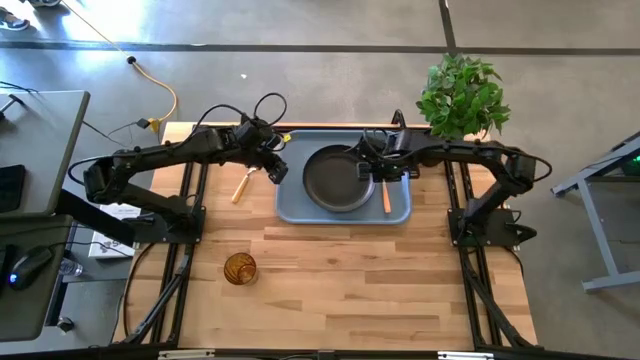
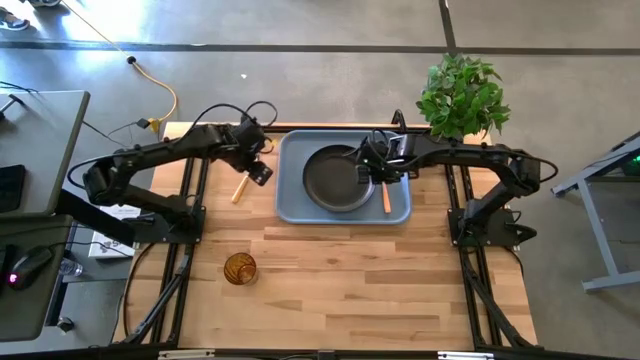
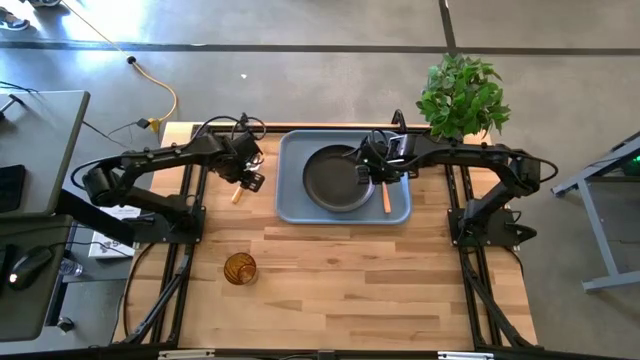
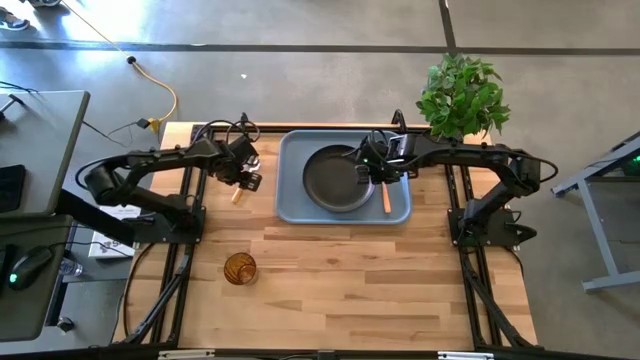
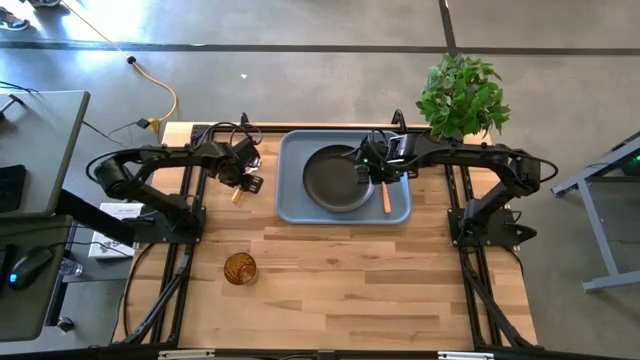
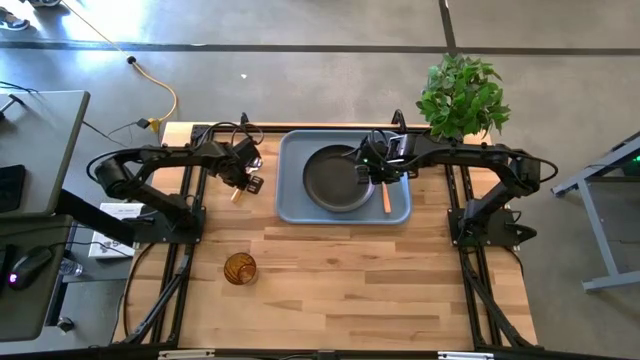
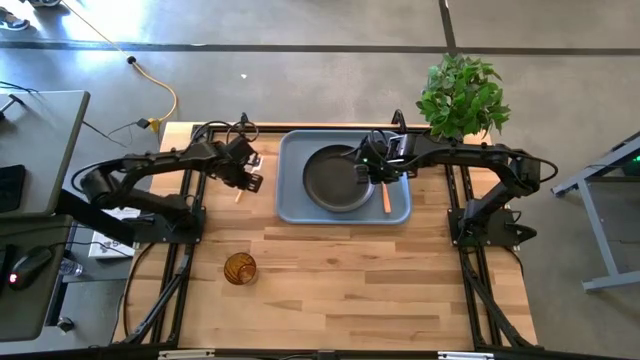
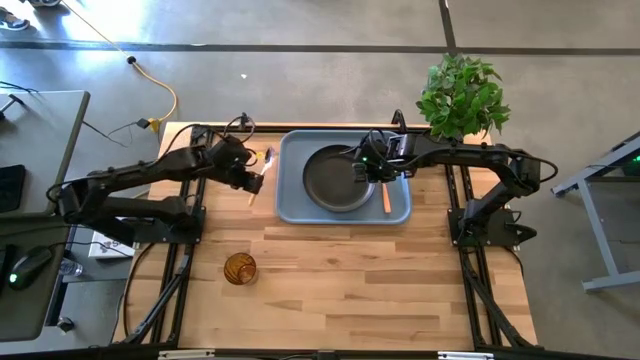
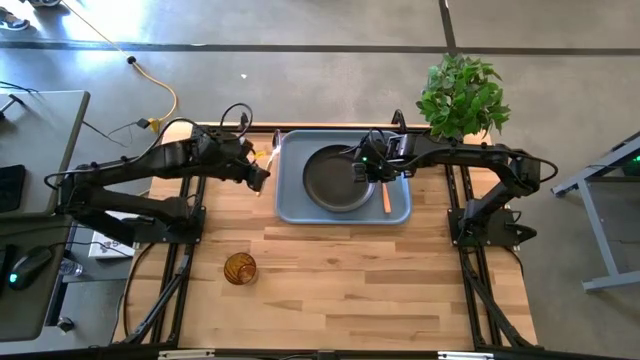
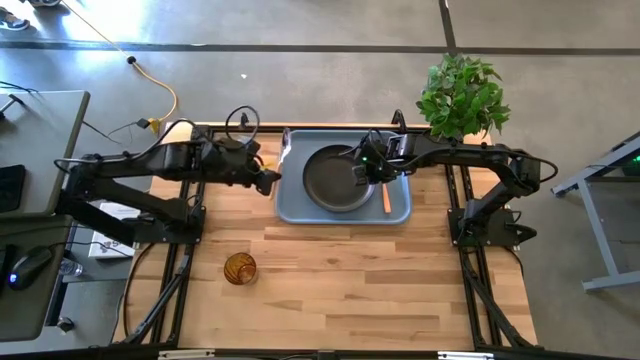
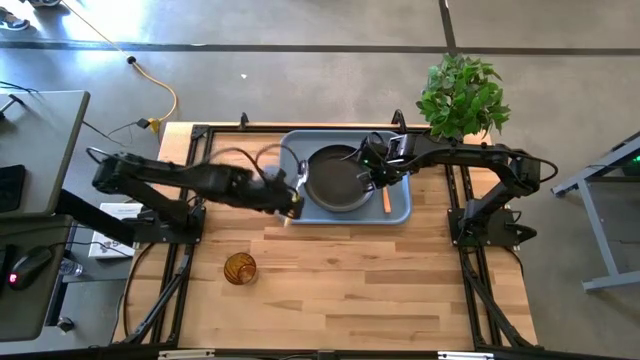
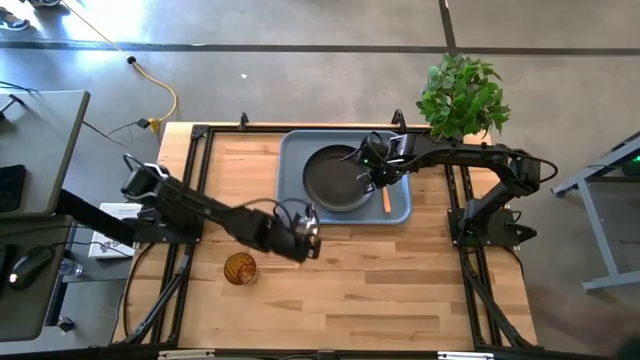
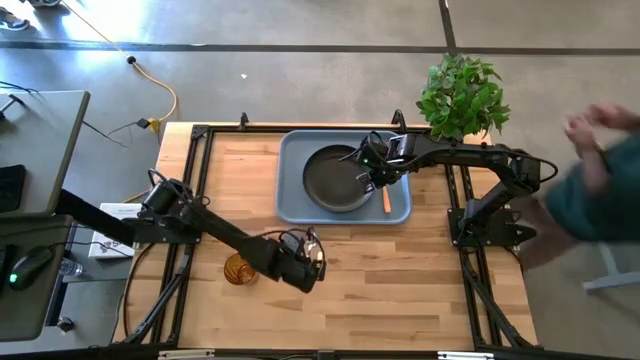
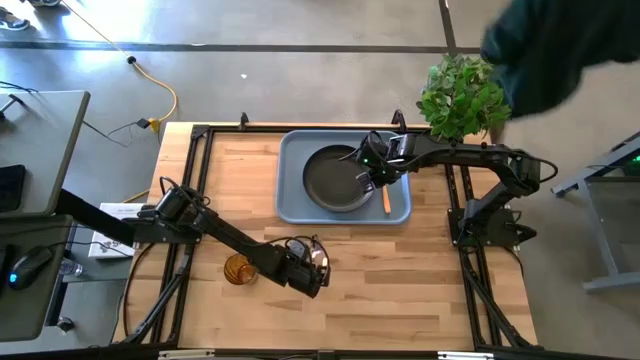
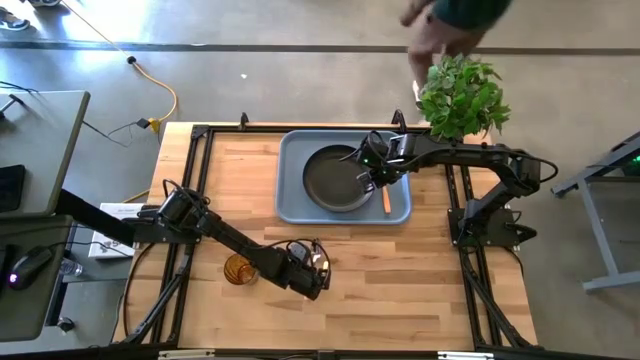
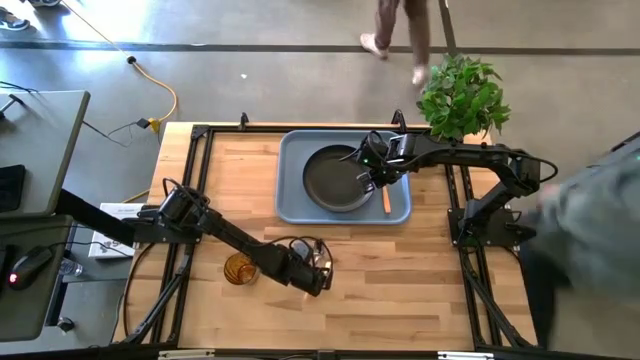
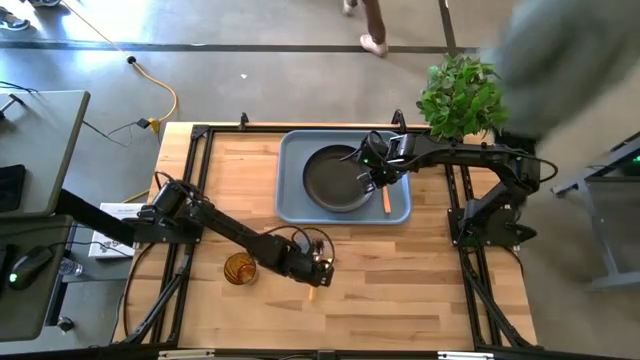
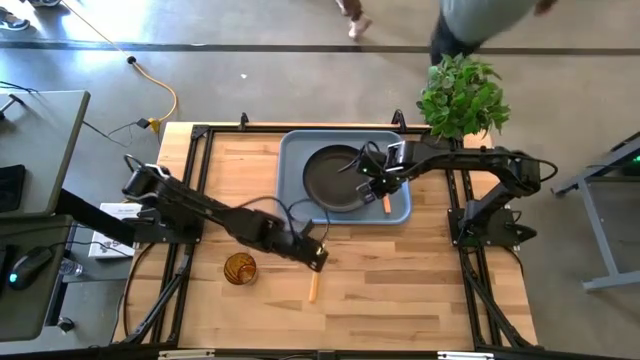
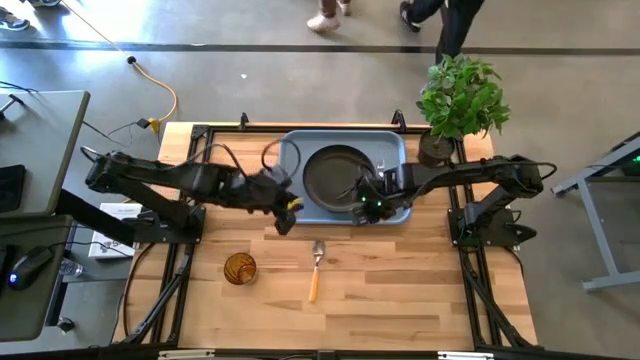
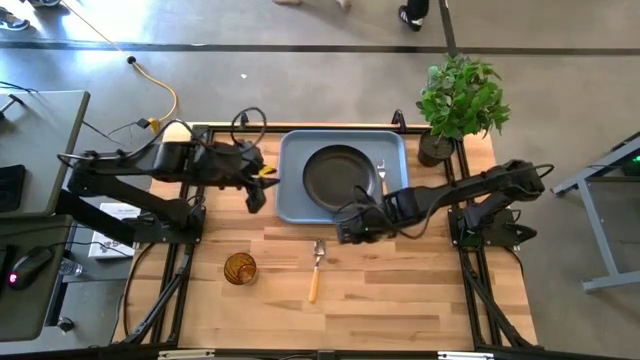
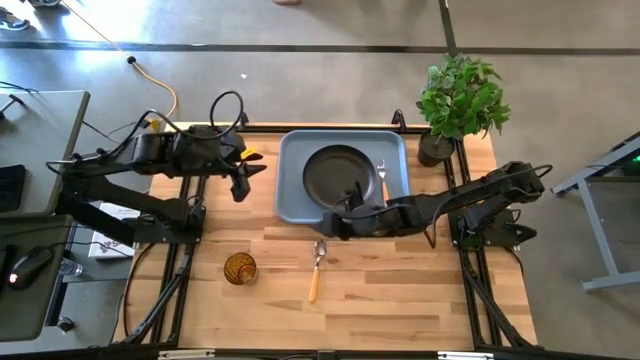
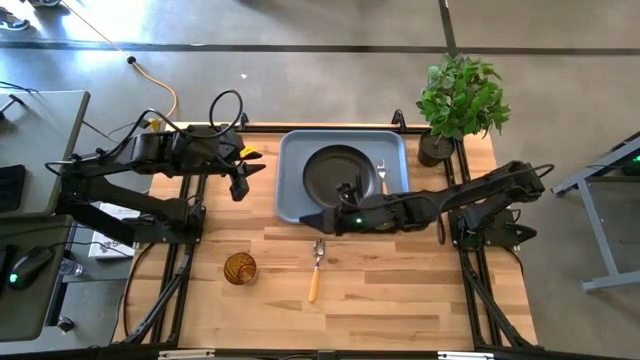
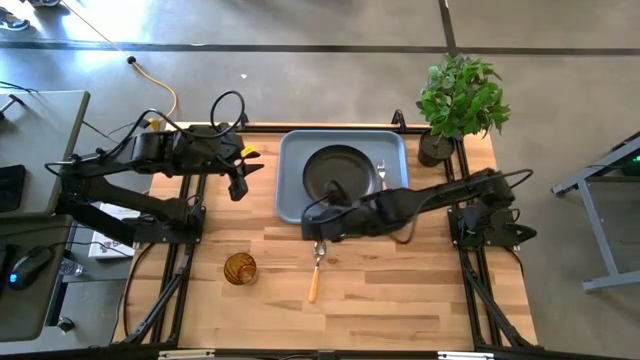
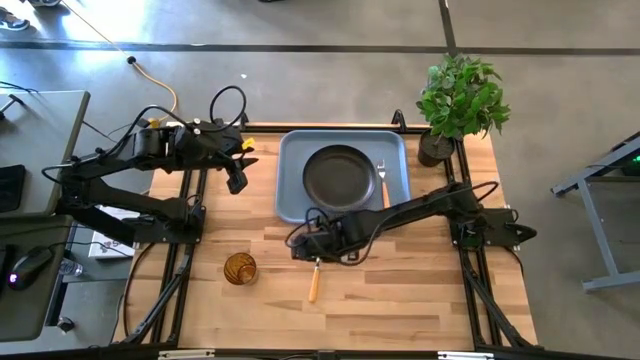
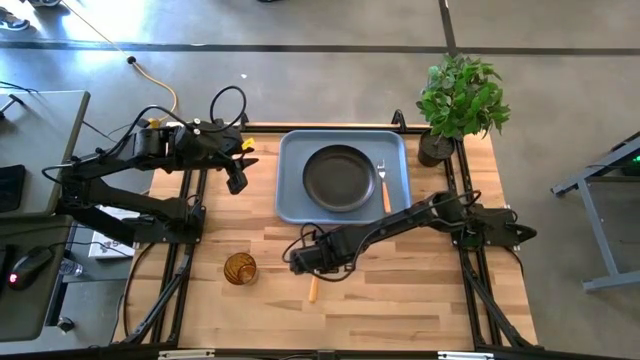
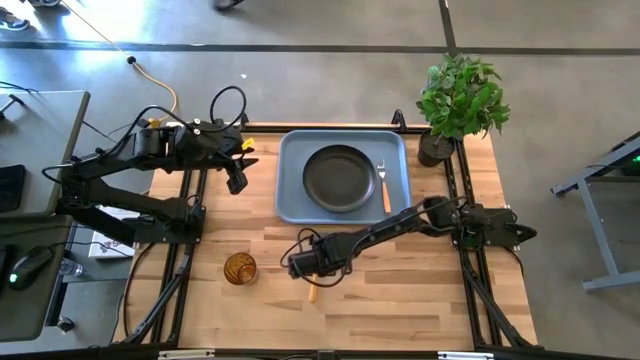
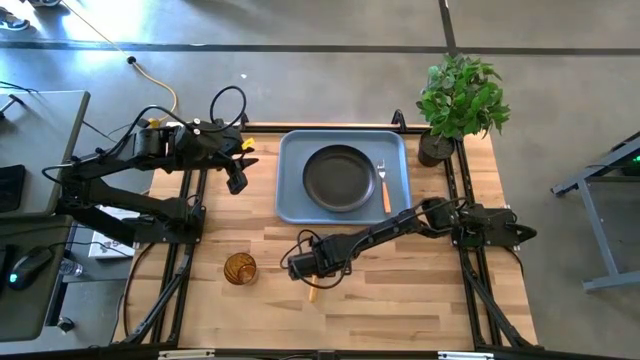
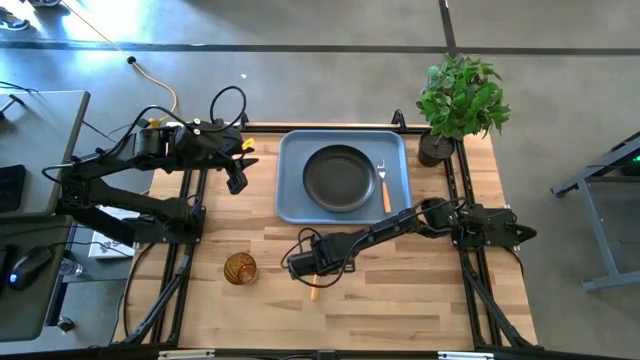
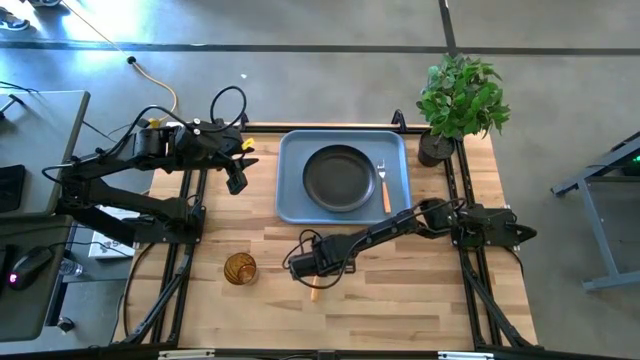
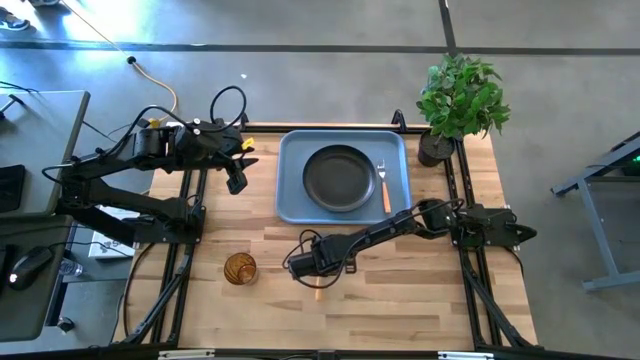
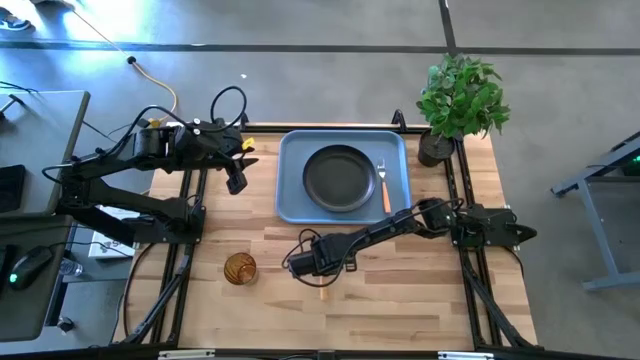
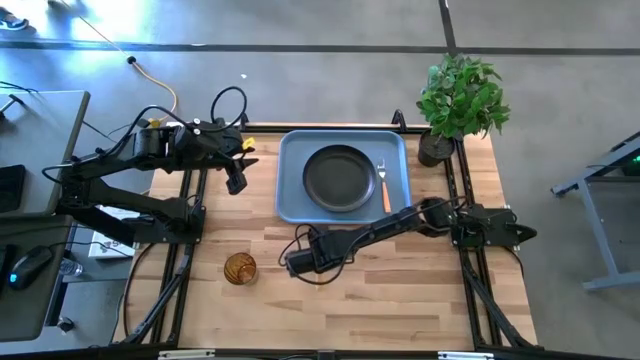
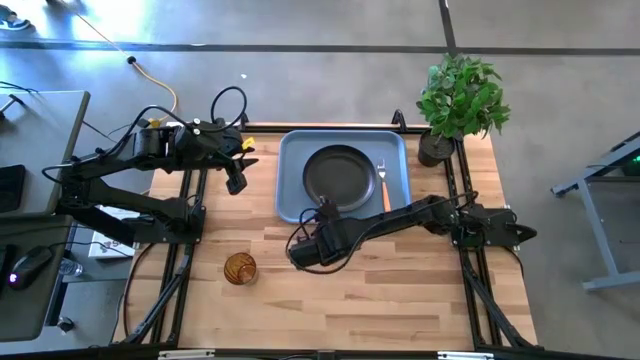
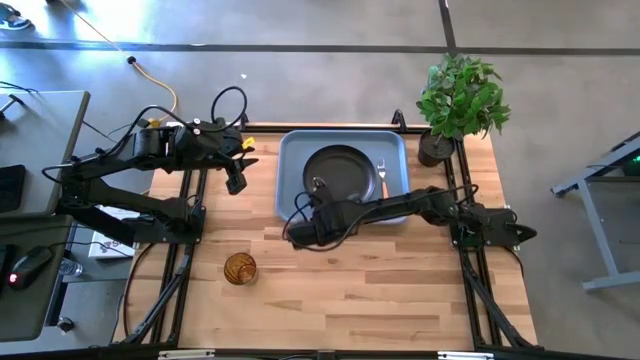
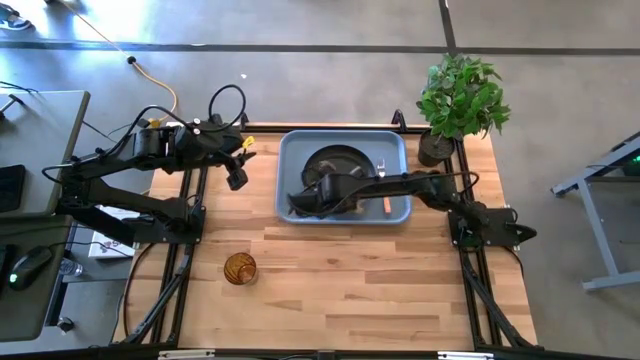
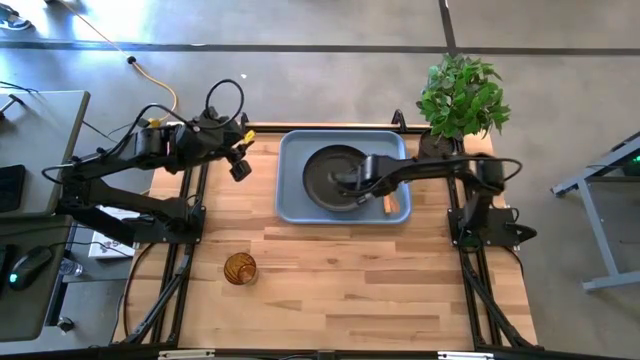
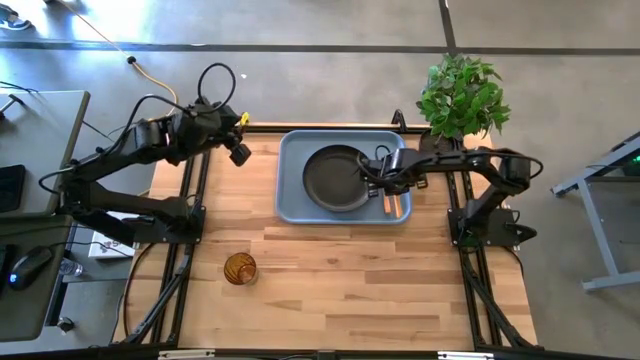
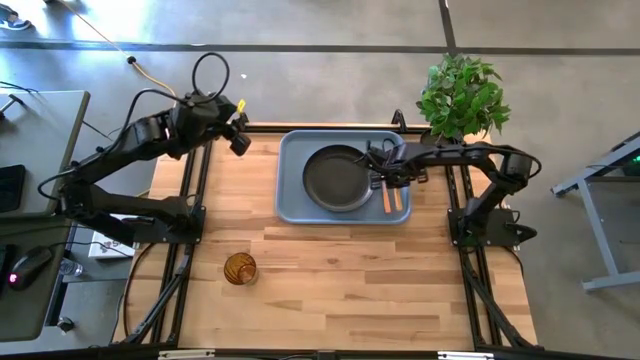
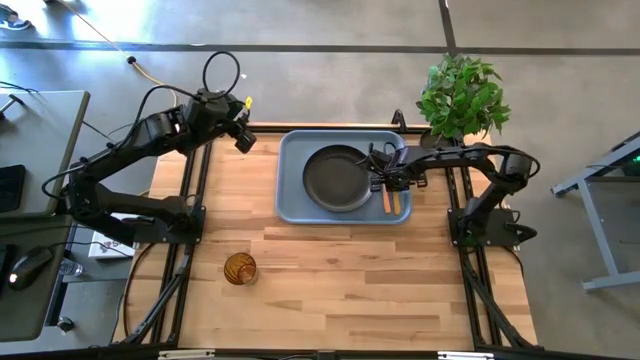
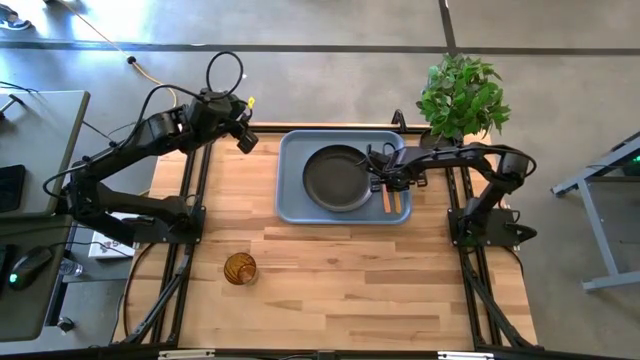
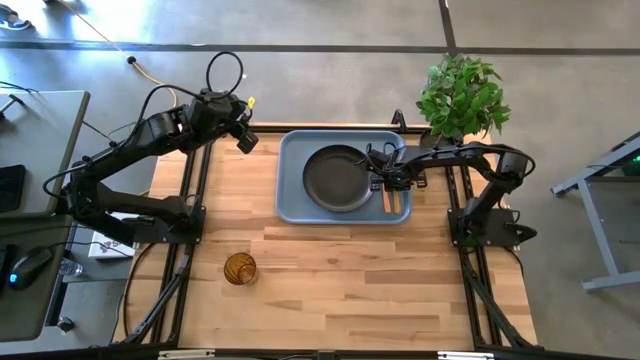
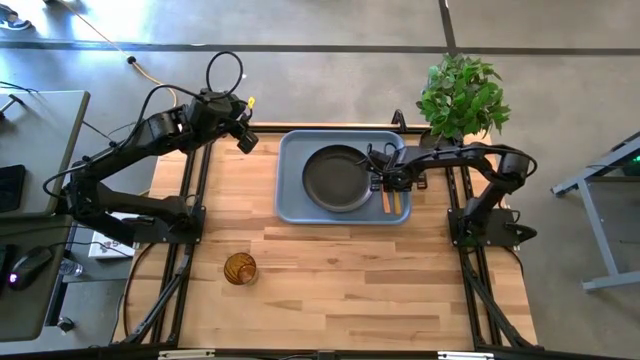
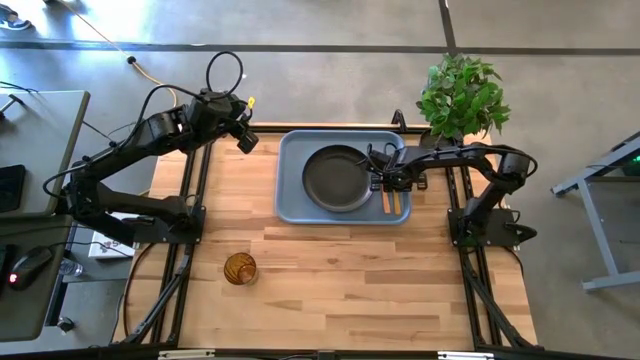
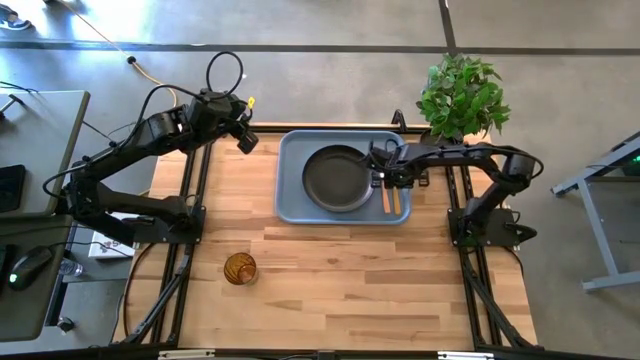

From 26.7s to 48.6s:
Task: Pick and place plate/cup/fork/spoon on tray
Put the orange spoon on the blue tray
